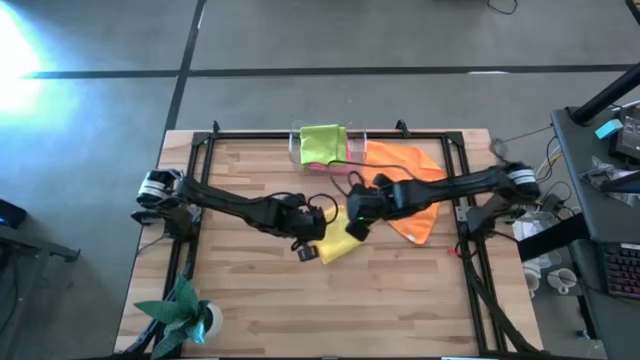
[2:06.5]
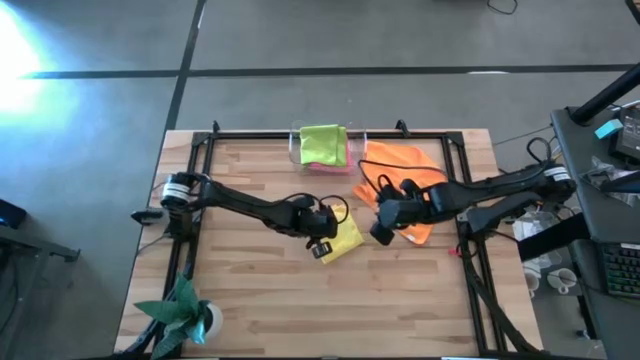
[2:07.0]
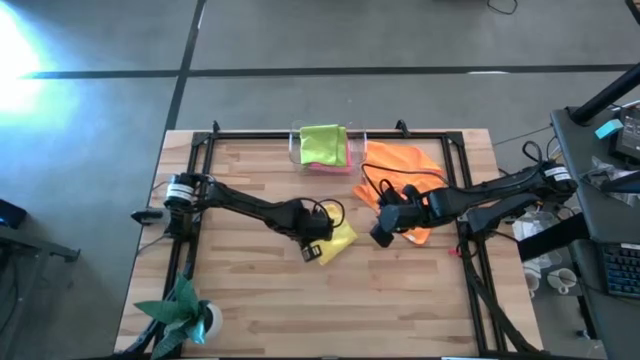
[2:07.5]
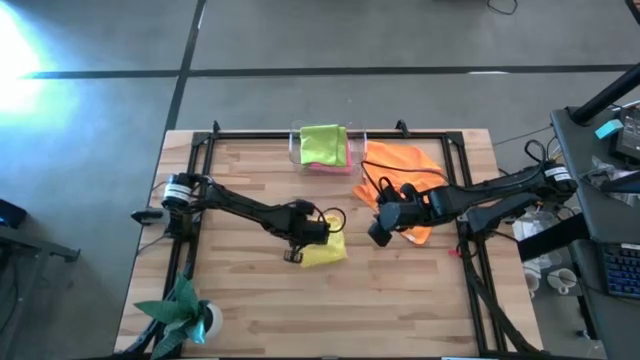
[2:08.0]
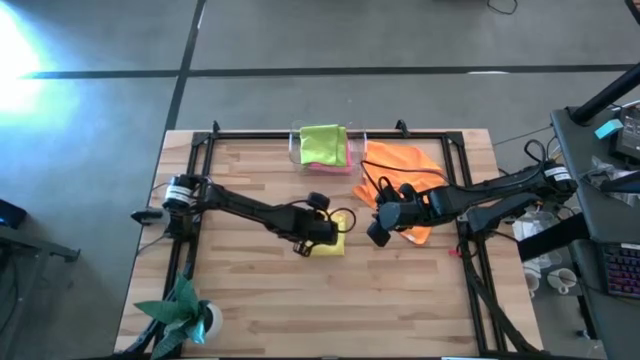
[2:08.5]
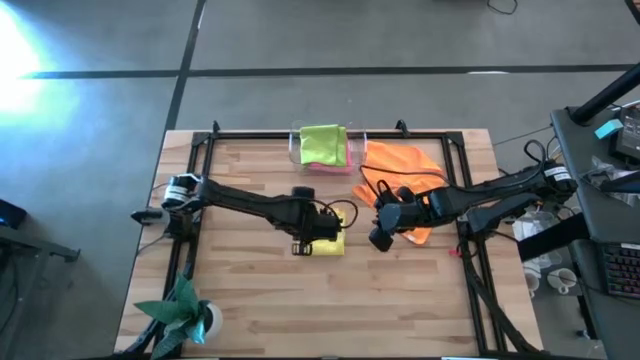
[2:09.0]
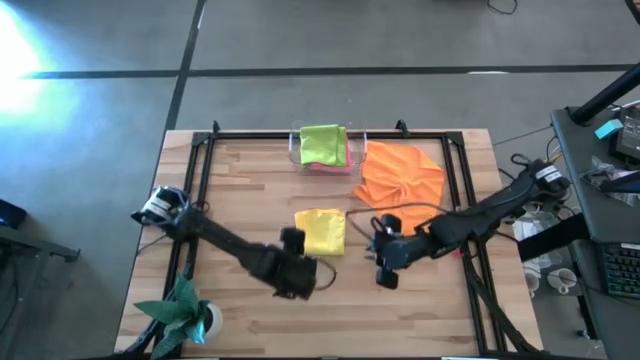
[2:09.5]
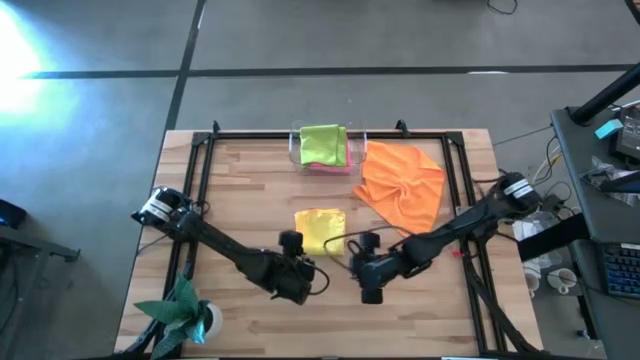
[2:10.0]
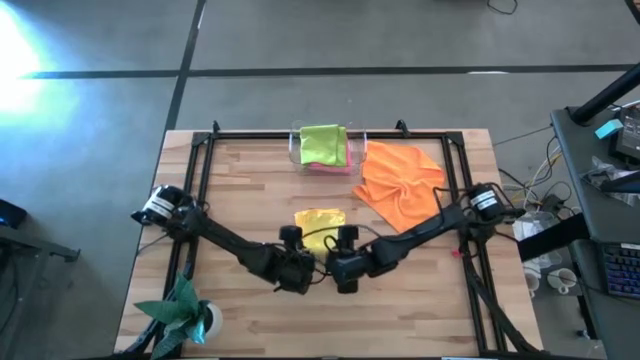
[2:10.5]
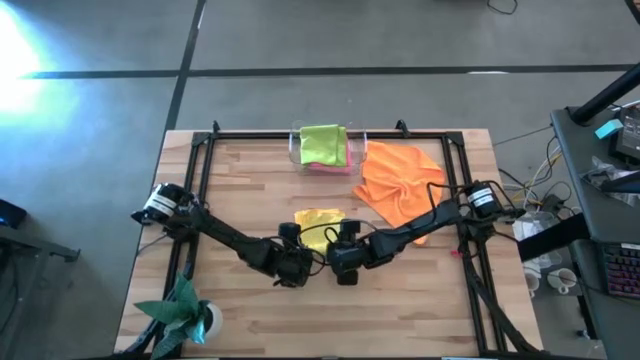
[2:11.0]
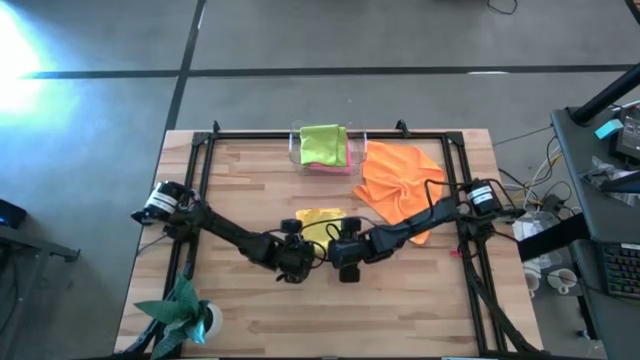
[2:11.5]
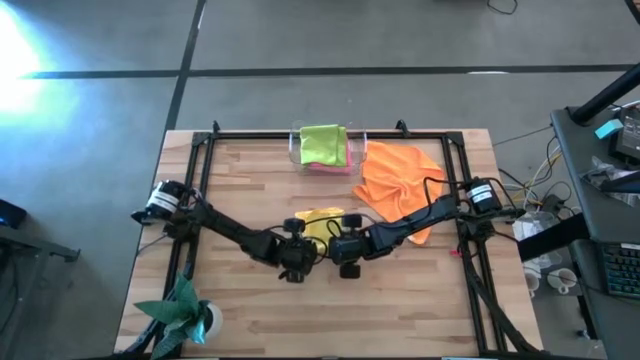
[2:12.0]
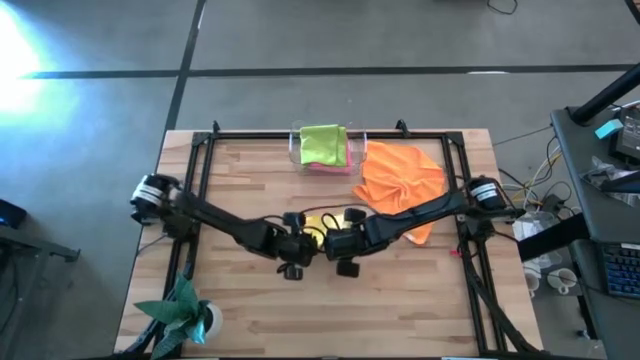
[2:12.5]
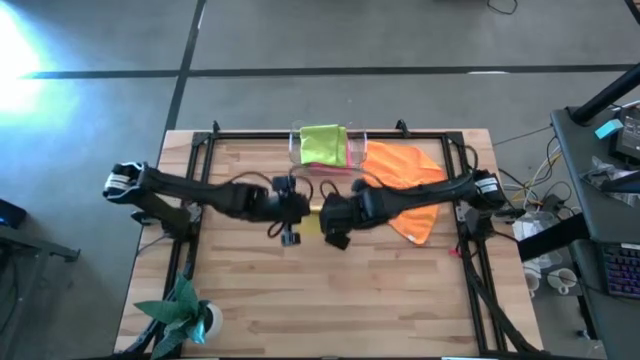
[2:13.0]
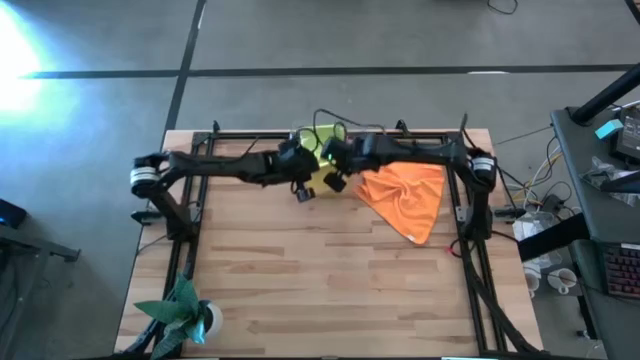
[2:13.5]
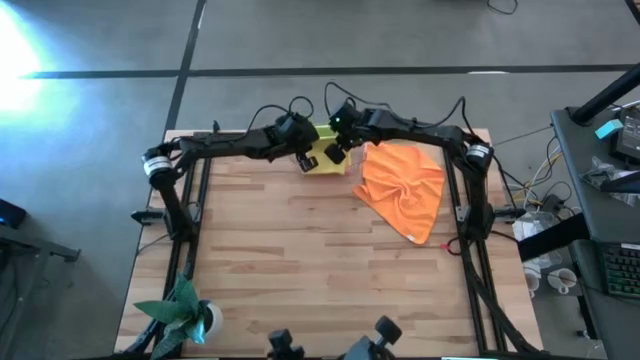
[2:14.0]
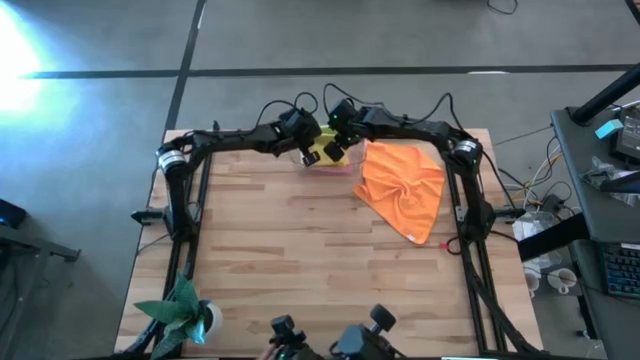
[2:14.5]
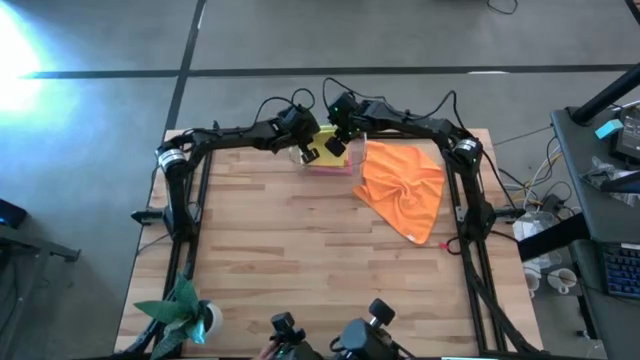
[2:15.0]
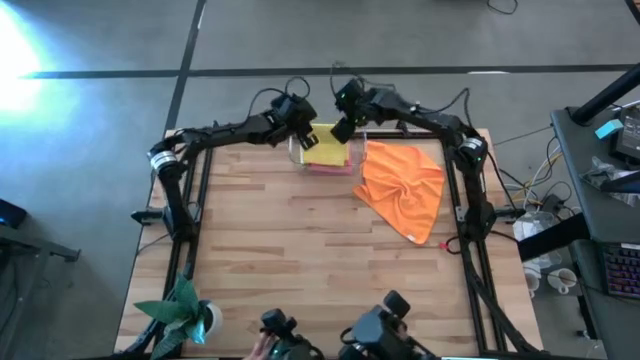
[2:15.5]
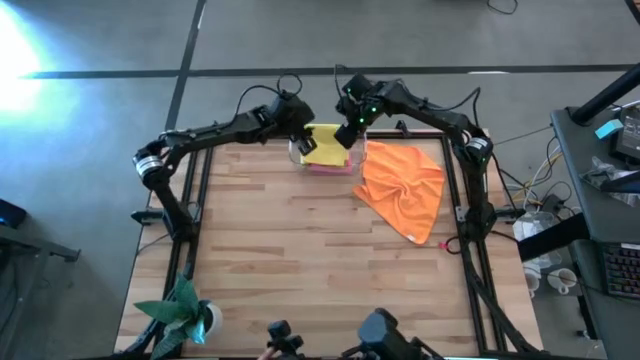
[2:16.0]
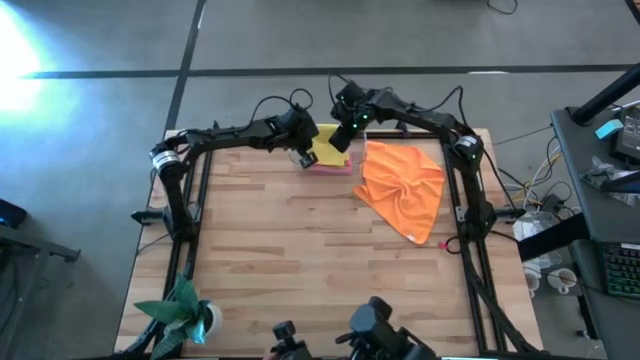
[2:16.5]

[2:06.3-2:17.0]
Task: Fold microfiber towels
Put the yellow microfiber towel into the transparent bin

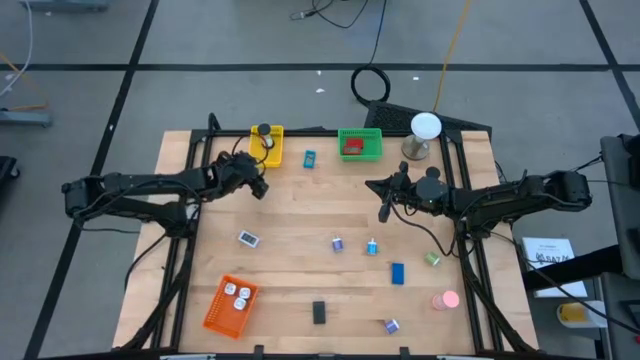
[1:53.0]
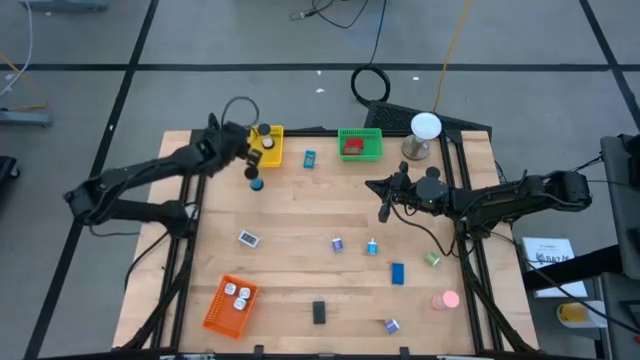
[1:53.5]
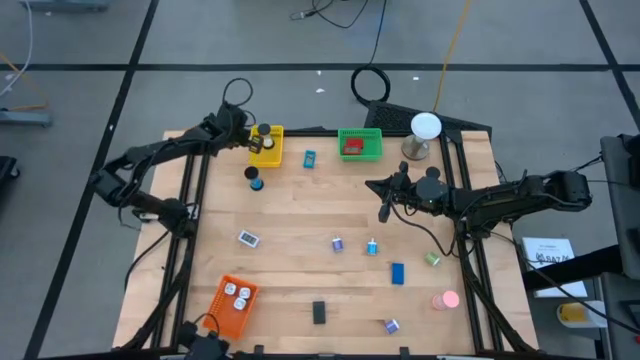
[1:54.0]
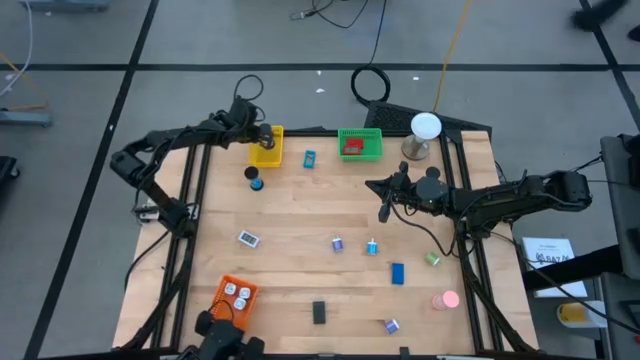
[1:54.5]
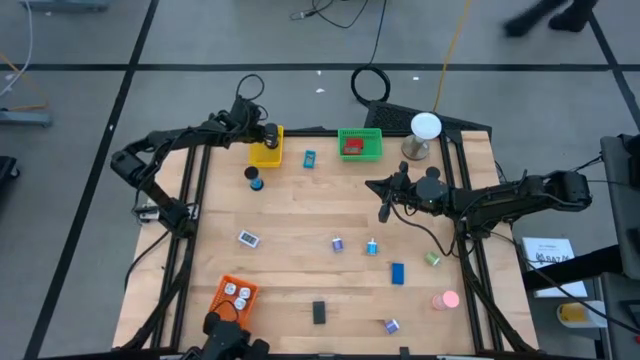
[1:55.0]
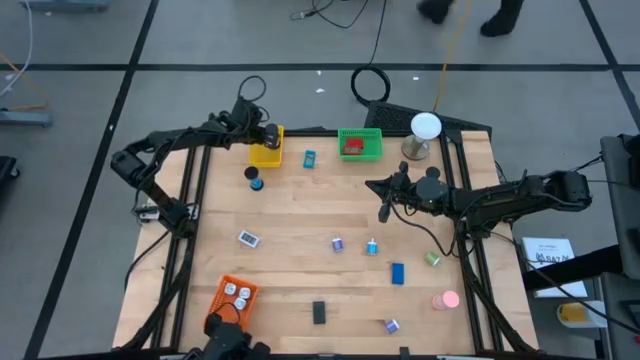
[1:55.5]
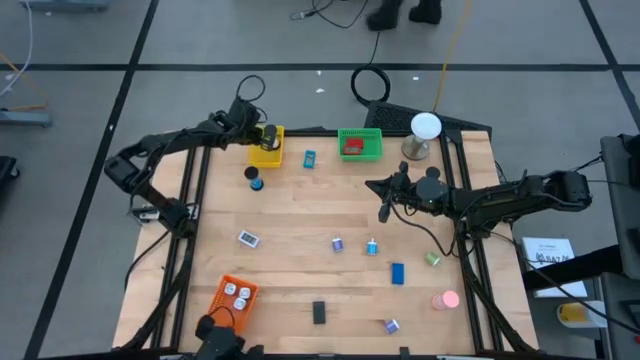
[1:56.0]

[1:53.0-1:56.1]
Task: Pick & Place Office items
Adjust the white hourglass in the yellow bin

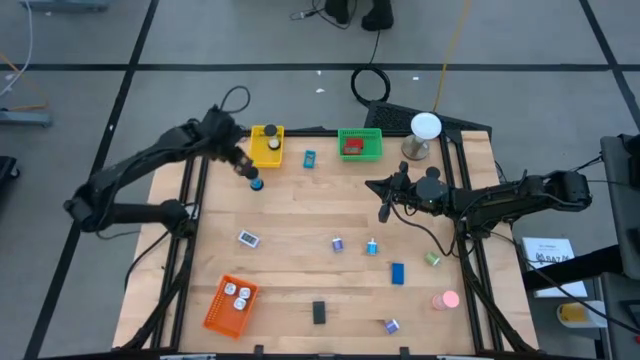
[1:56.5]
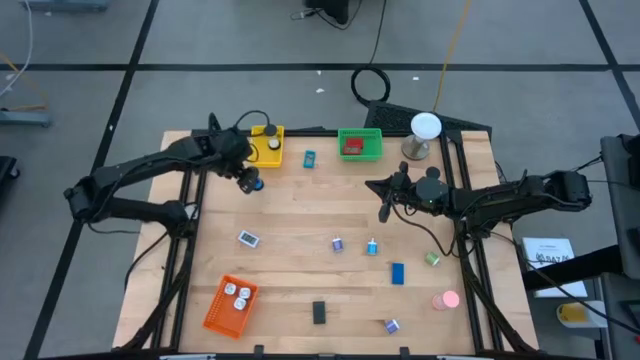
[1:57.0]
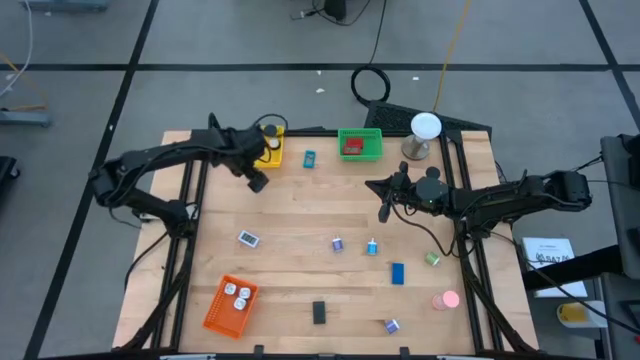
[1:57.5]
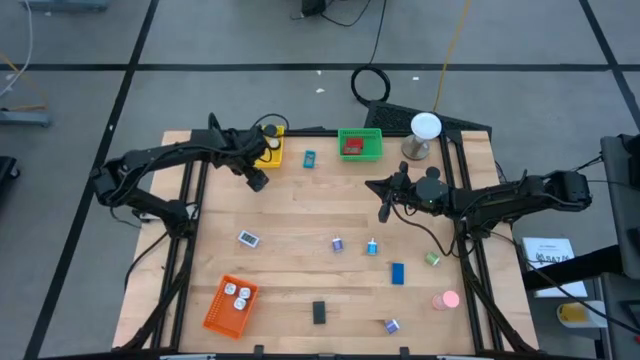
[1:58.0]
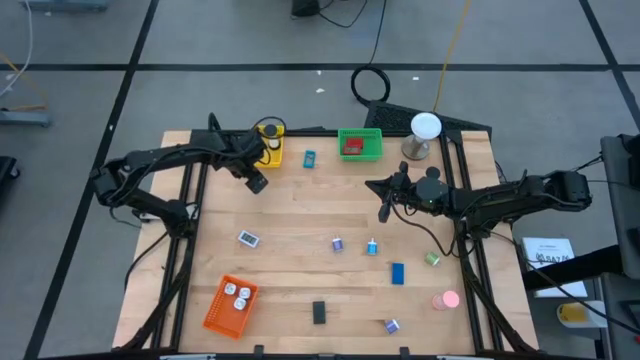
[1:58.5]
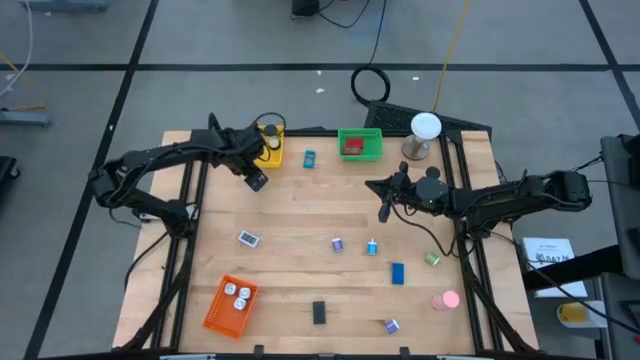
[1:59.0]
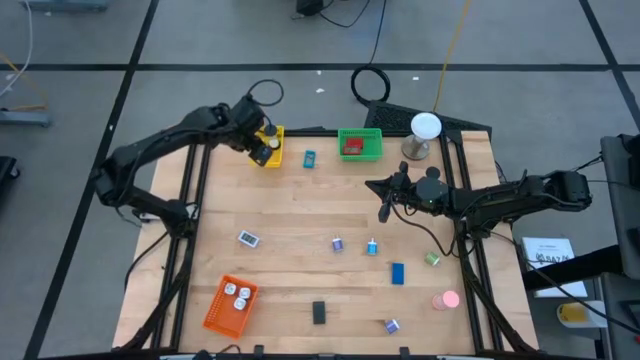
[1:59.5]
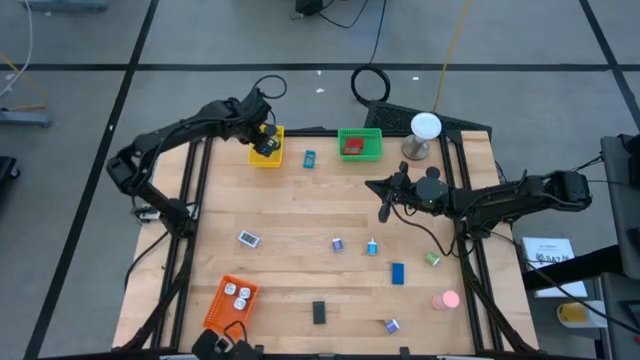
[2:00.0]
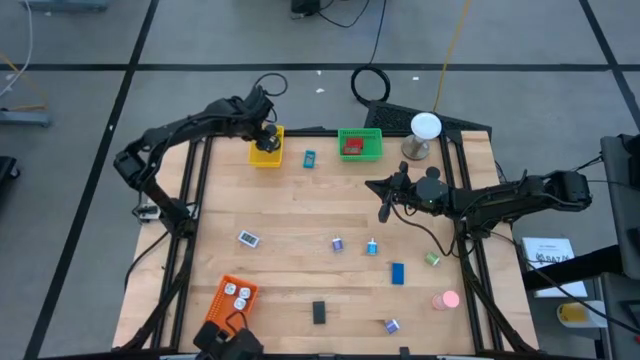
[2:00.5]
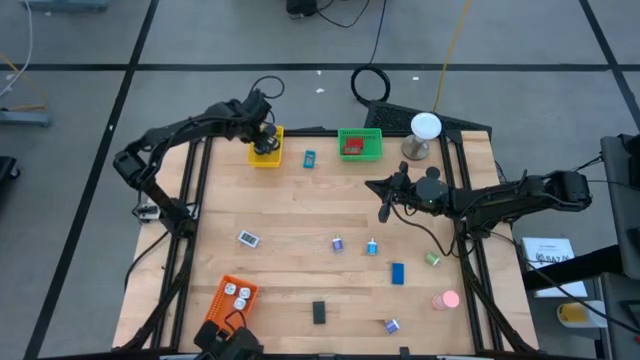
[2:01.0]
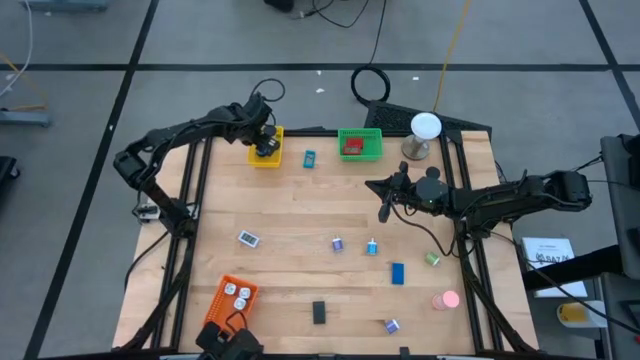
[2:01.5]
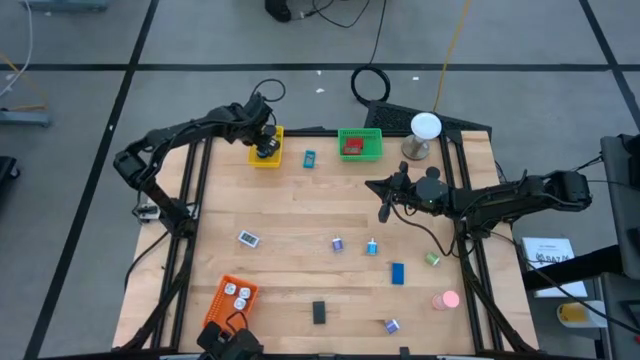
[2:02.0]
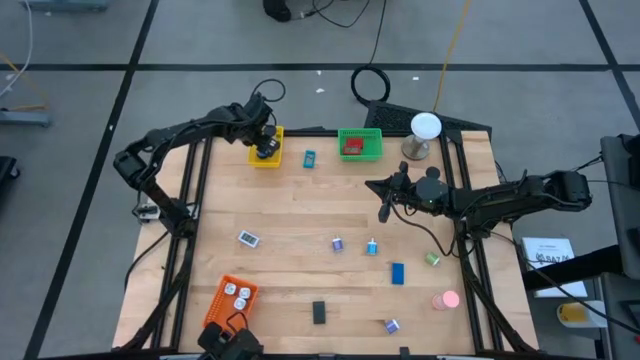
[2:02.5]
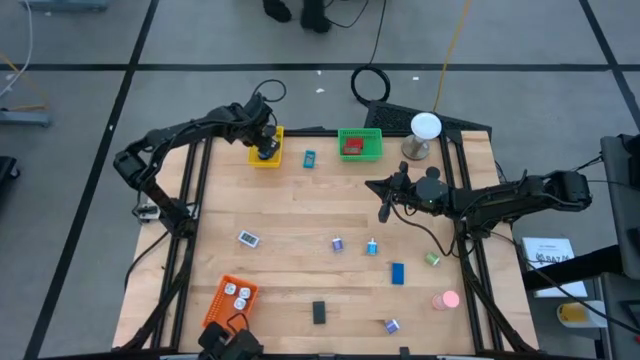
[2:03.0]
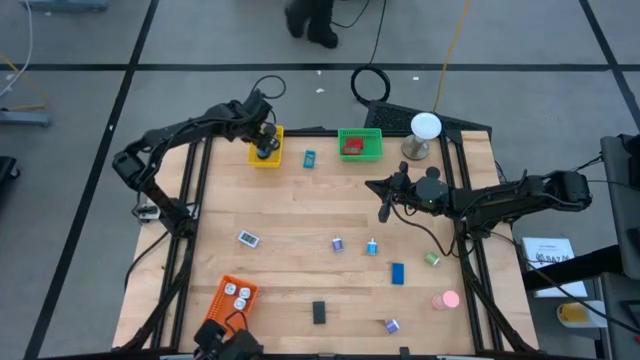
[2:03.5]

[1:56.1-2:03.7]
Put the blue hourglass into the yellow bin
